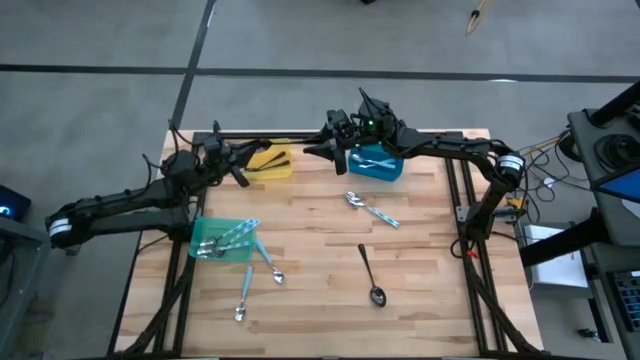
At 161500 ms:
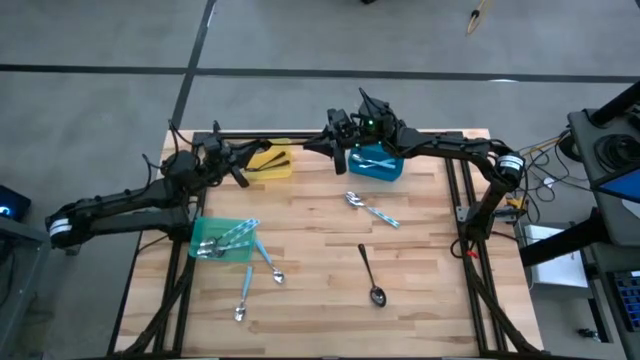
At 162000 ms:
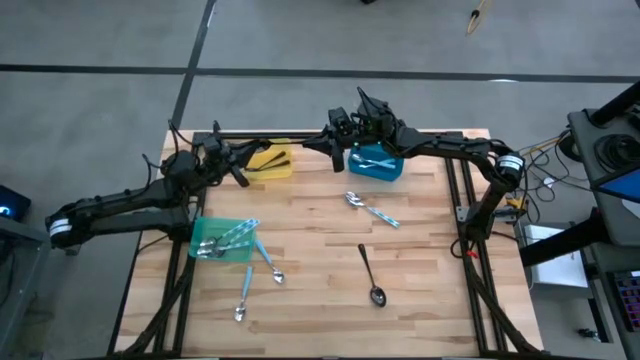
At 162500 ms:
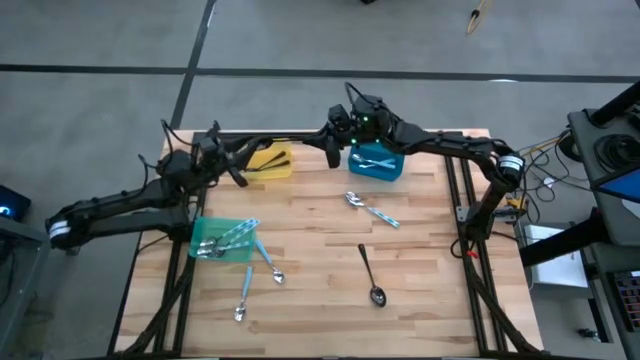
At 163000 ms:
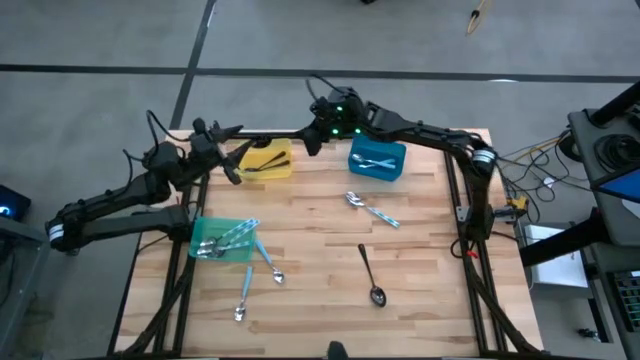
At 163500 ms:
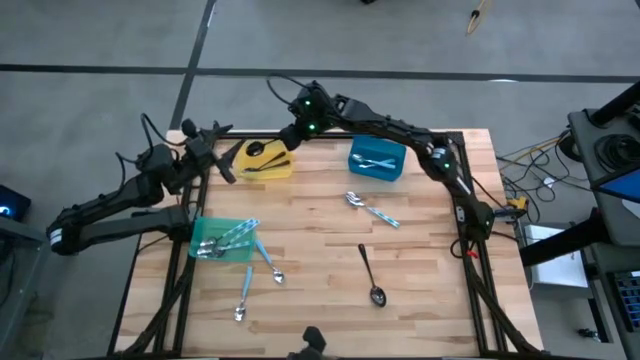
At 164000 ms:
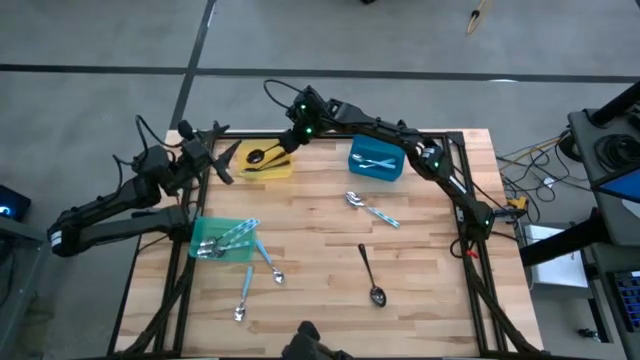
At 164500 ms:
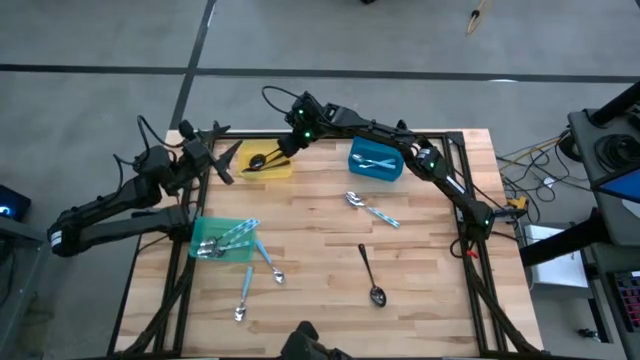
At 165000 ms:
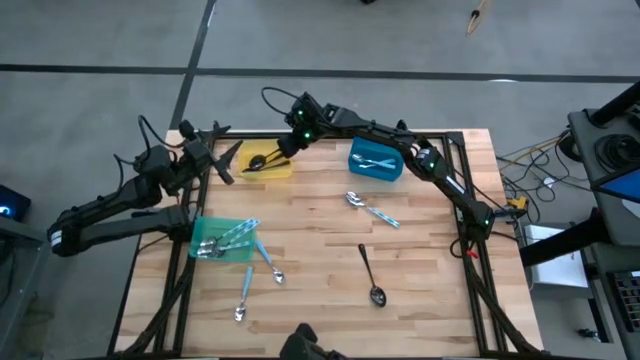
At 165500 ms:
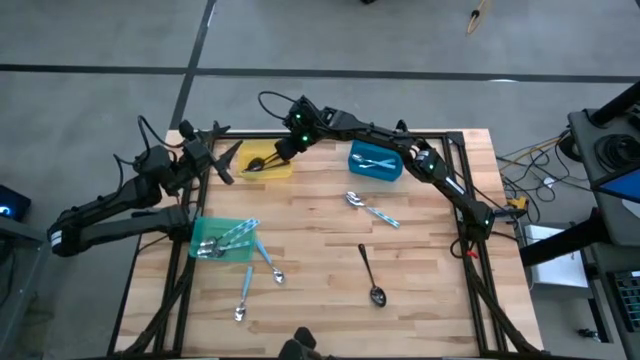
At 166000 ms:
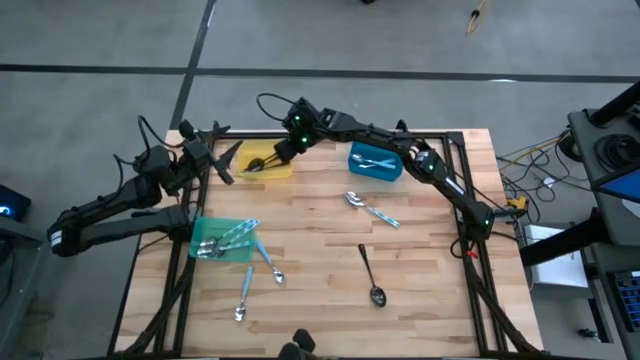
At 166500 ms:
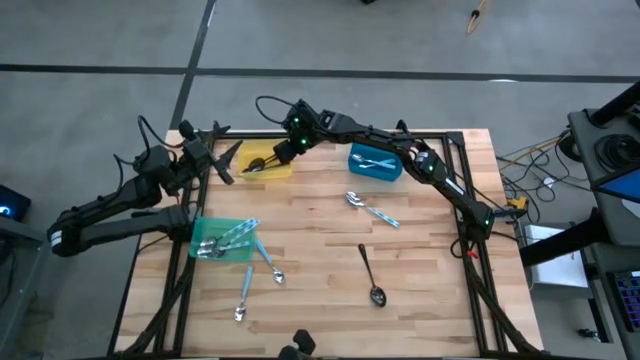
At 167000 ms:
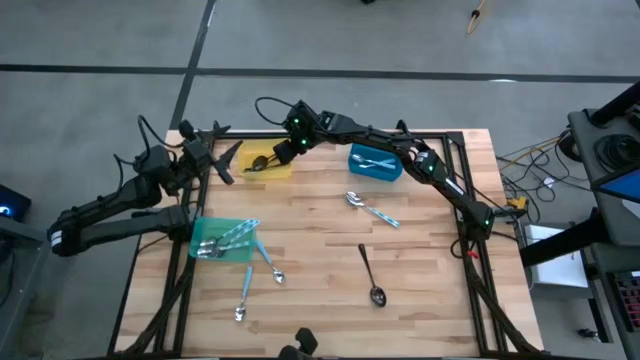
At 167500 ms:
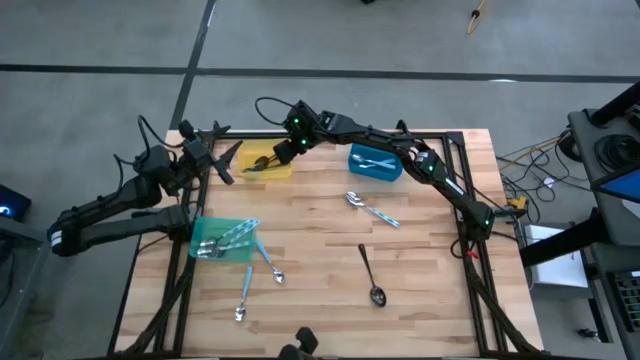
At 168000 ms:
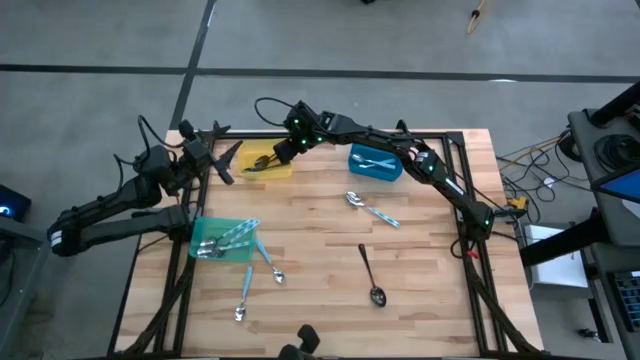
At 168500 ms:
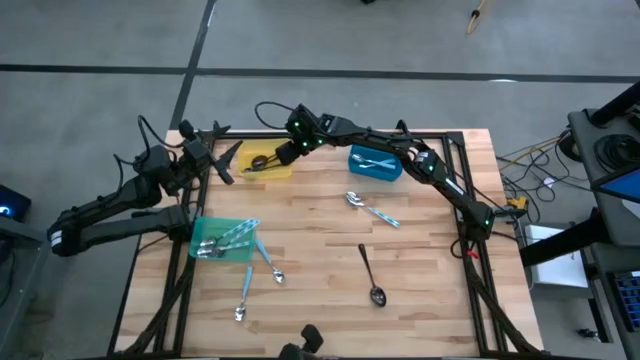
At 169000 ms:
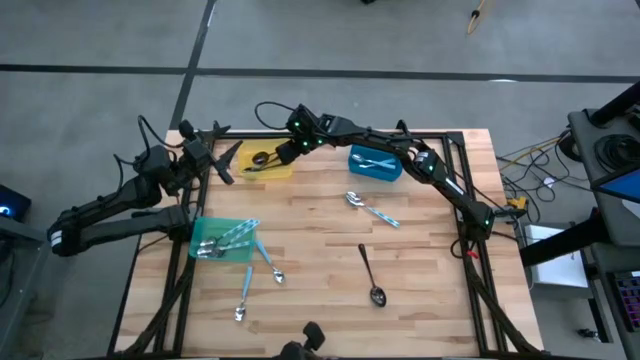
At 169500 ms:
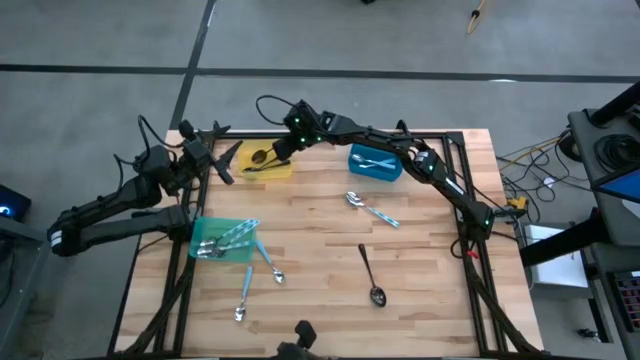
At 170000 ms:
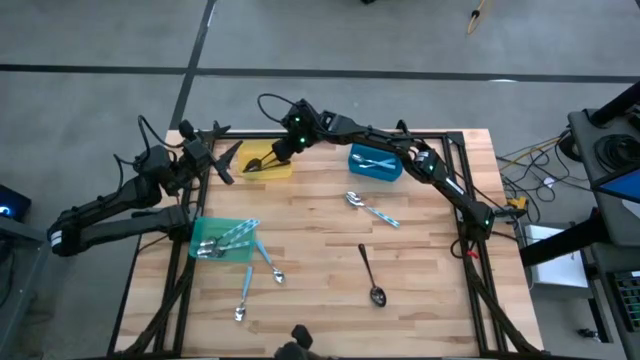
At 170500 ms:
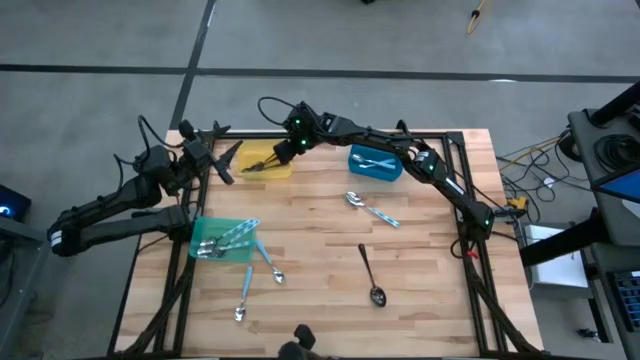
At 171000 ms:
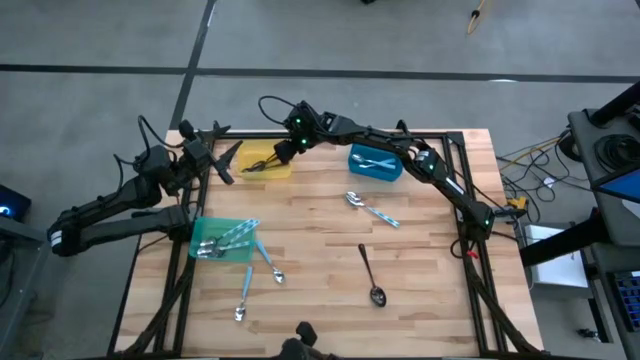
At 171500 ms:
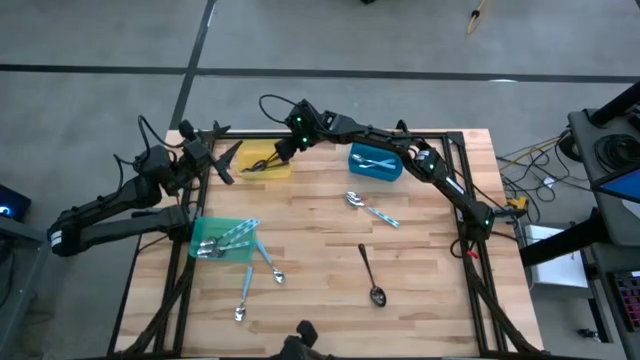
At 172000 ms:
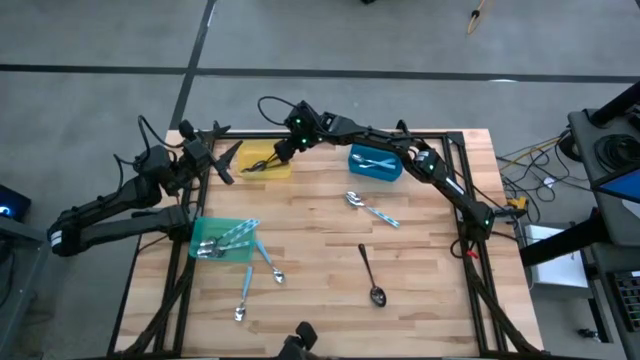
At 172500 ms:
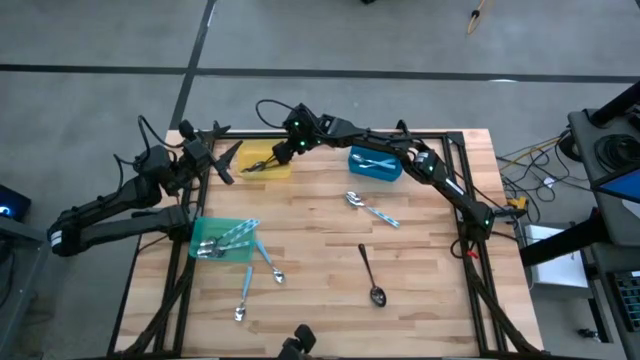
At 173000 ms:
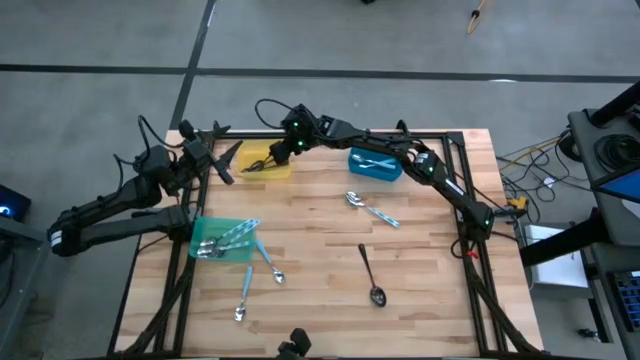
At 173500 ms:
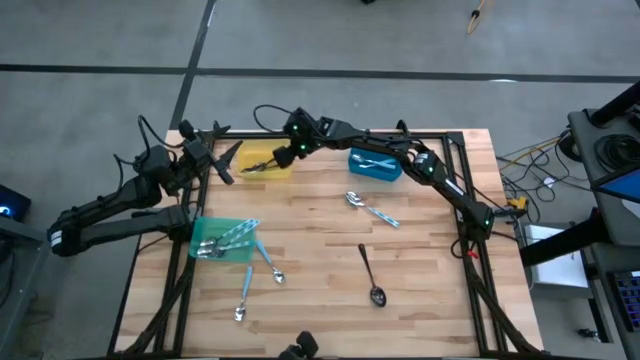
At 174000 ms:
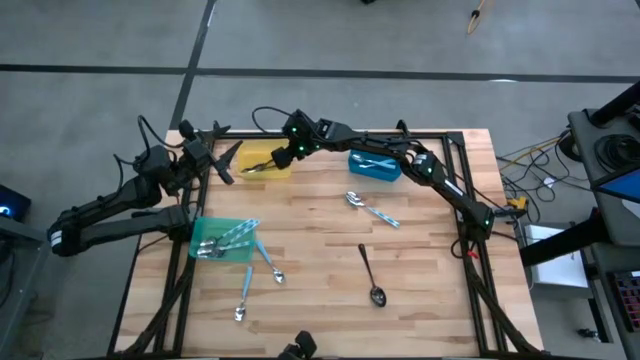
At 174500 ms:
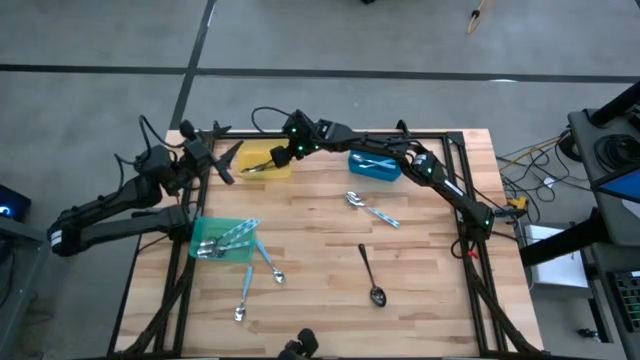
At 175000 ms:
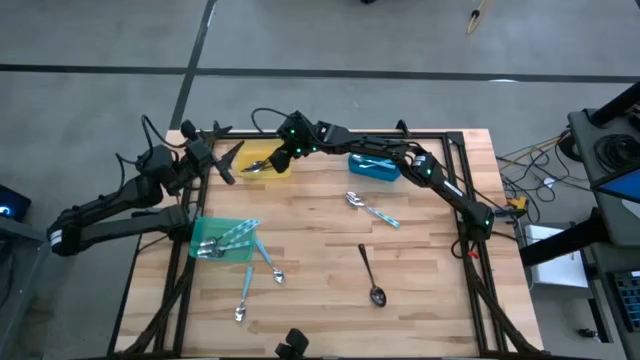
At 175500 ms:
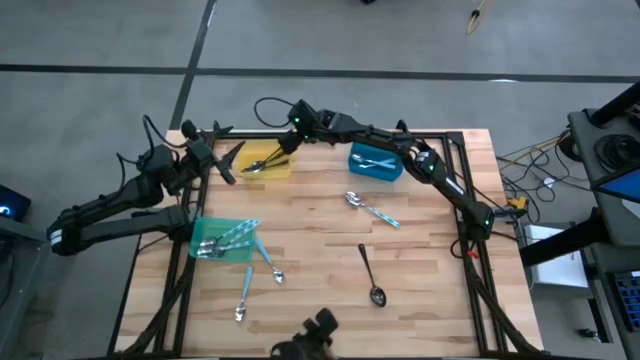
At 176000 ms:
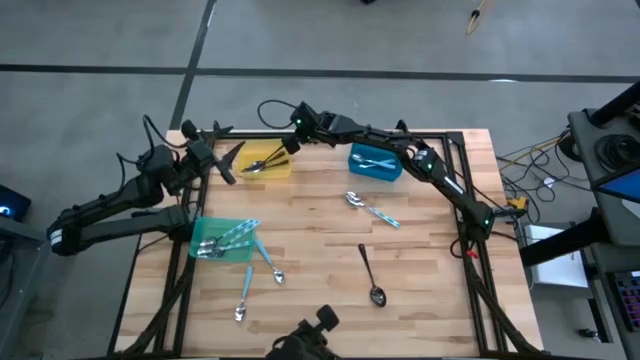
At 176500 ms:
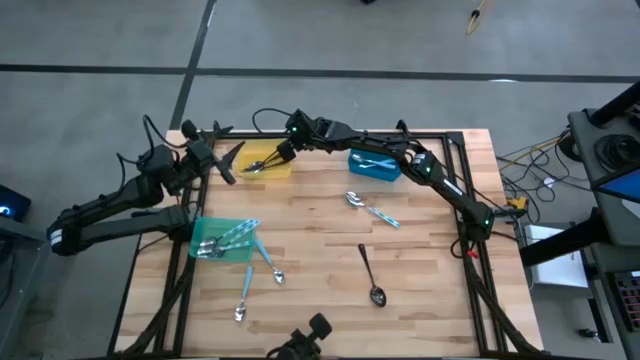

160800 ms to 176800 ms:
Task: Sort silverware by color (type)
Put the black spoon into the yellow bin

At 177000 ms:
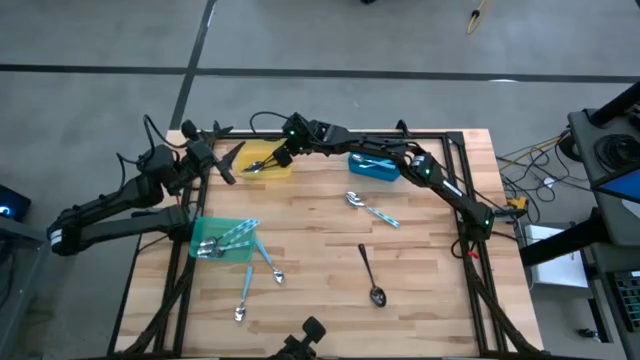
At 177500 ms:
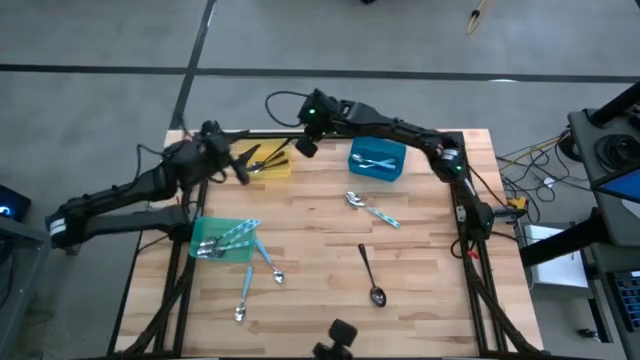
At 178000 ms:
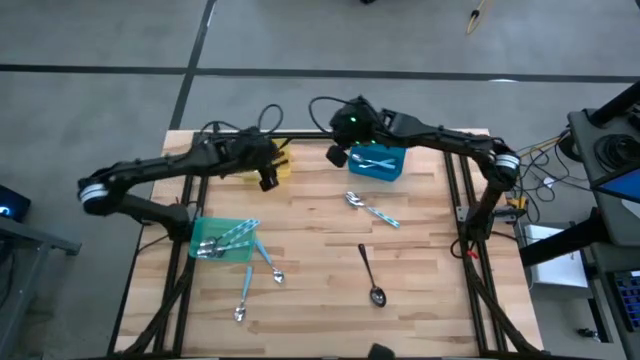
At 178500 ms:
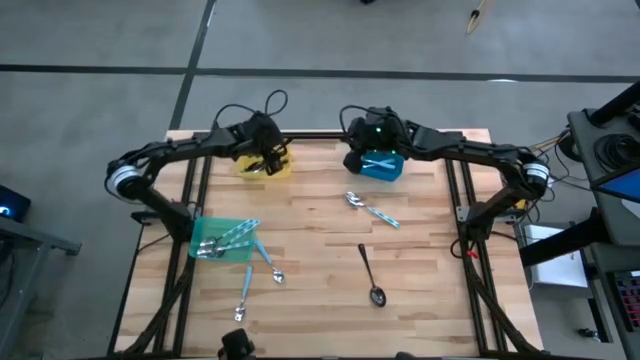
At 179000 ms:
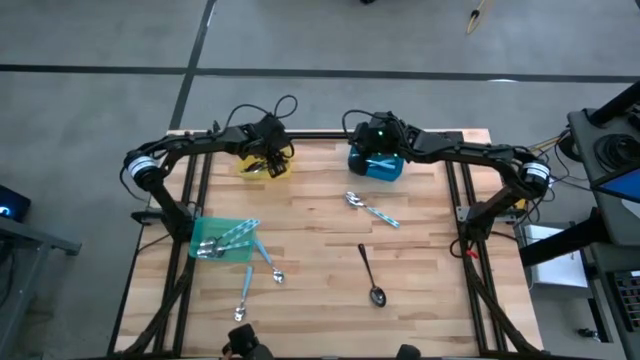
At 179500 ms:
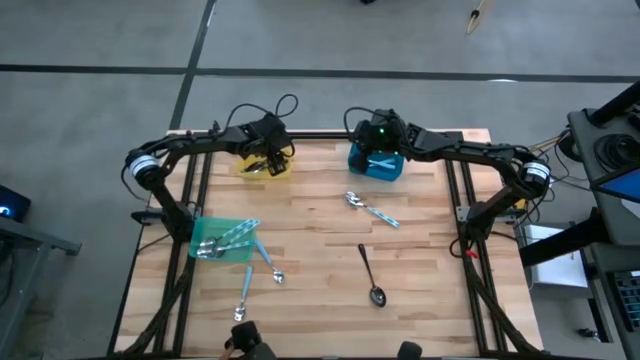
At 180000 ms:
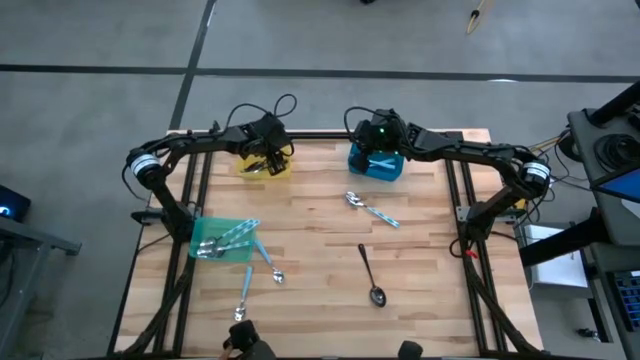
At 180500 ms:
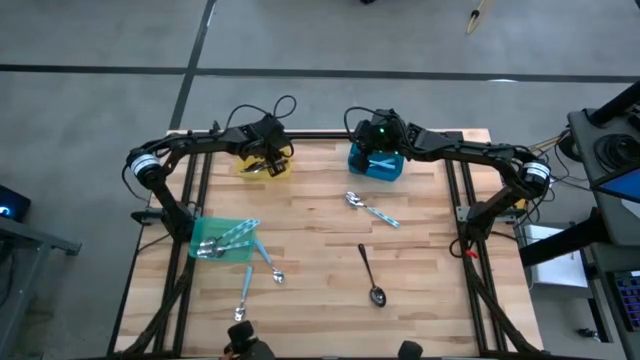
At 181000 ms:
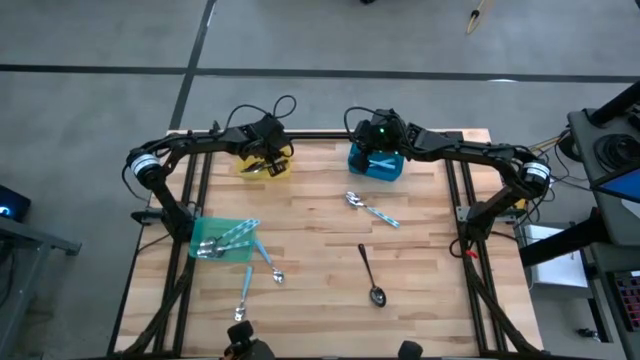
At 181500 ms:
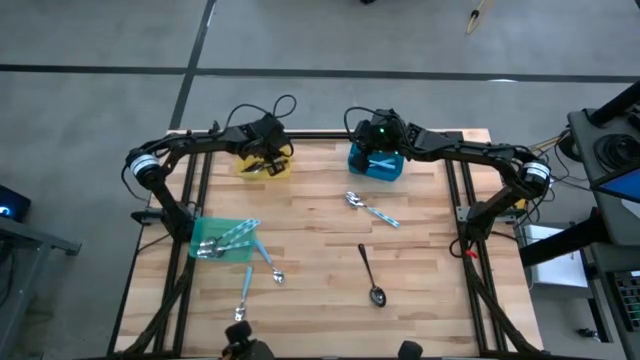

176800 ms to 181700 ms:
Put the black spoon into the yellow bin
